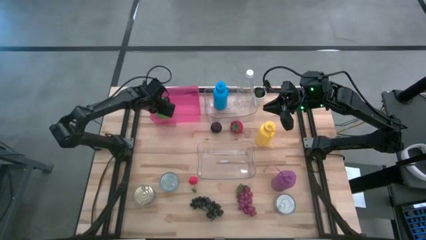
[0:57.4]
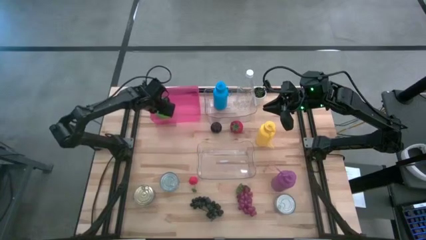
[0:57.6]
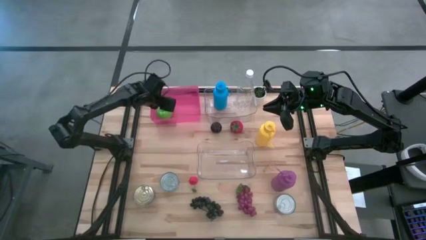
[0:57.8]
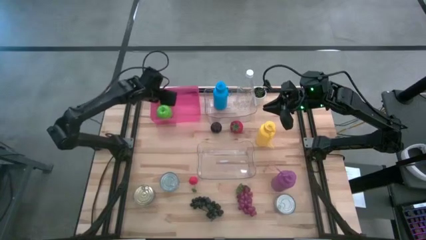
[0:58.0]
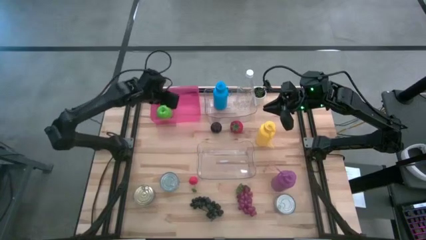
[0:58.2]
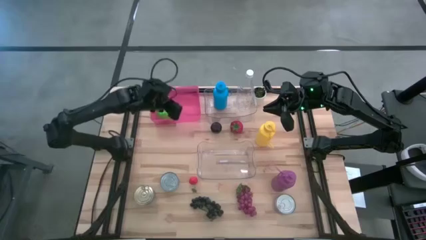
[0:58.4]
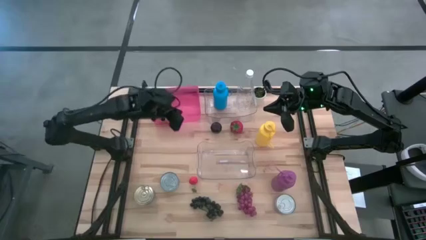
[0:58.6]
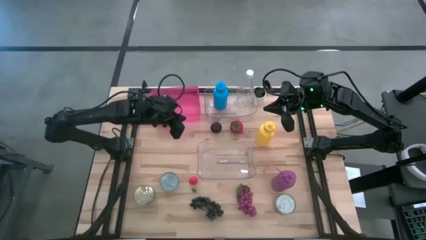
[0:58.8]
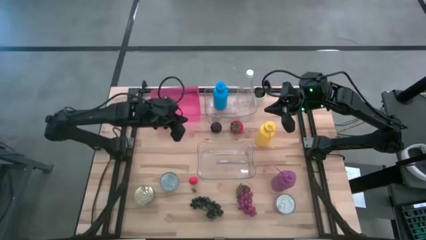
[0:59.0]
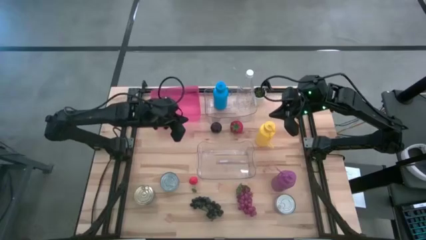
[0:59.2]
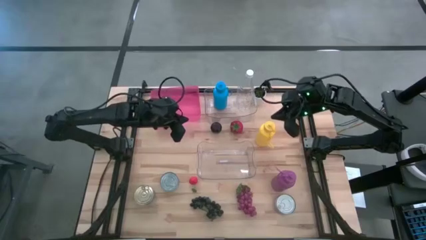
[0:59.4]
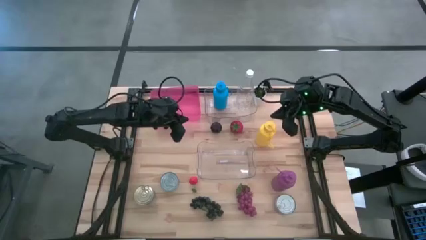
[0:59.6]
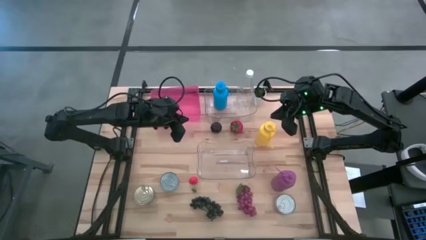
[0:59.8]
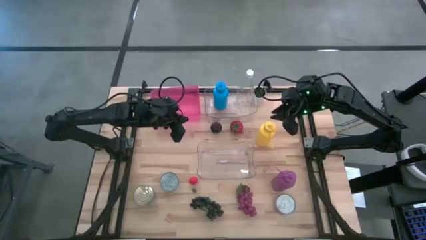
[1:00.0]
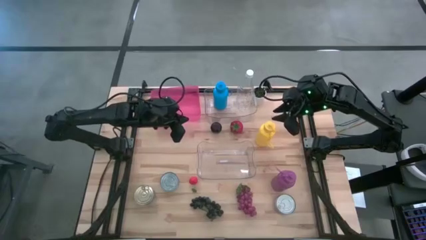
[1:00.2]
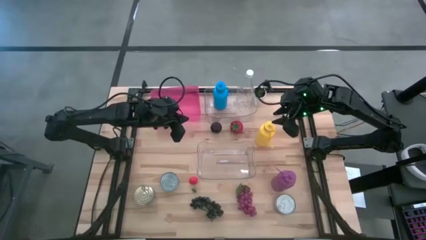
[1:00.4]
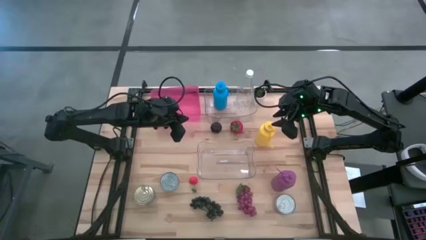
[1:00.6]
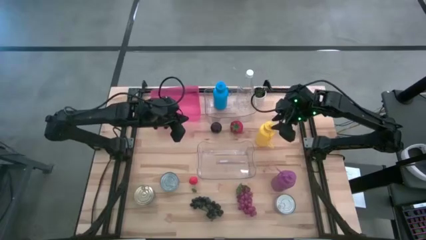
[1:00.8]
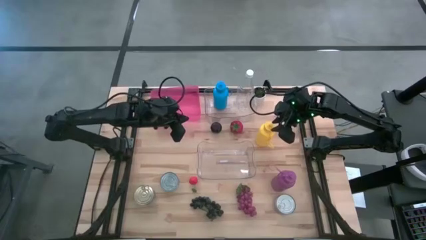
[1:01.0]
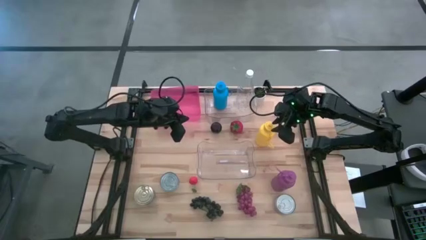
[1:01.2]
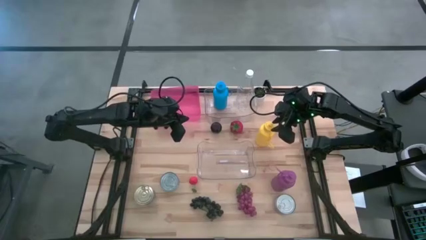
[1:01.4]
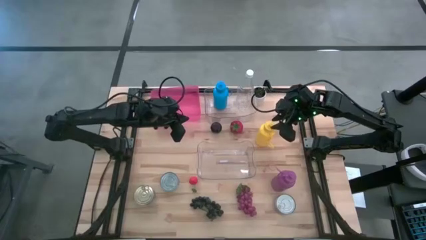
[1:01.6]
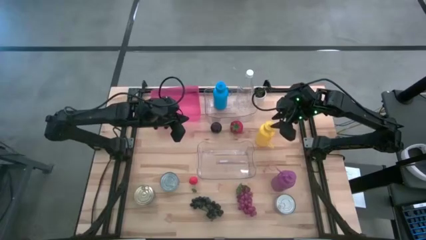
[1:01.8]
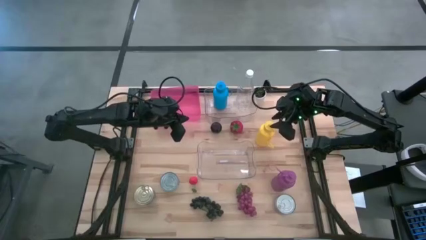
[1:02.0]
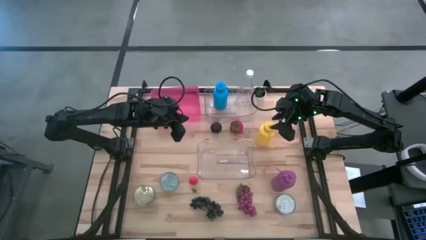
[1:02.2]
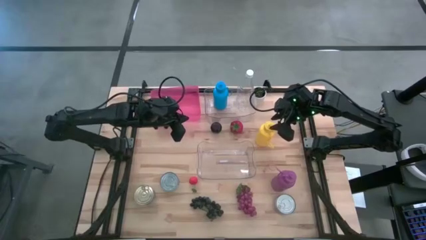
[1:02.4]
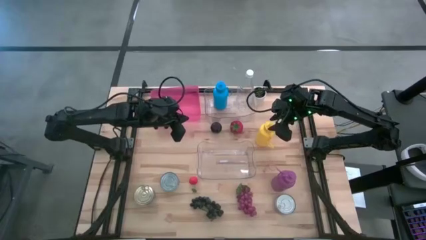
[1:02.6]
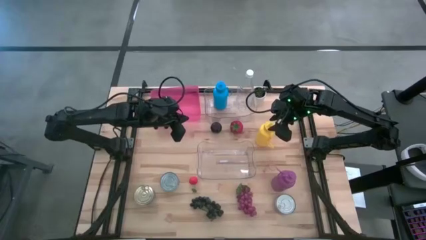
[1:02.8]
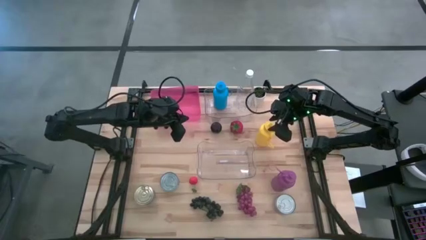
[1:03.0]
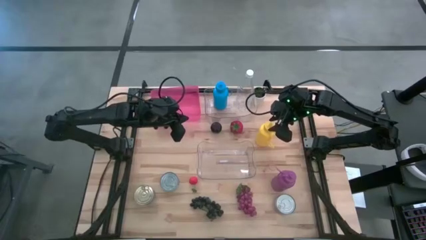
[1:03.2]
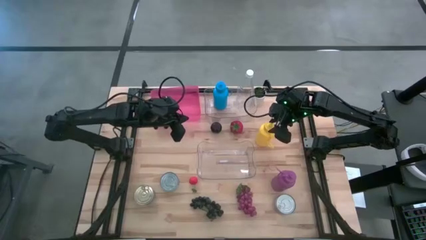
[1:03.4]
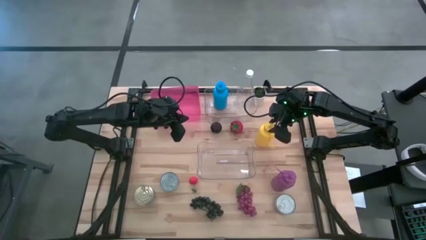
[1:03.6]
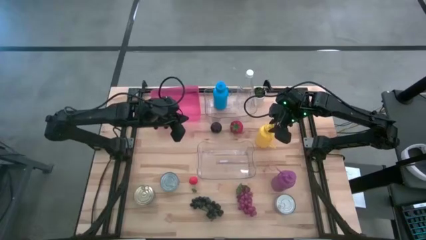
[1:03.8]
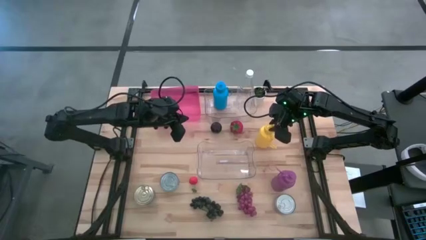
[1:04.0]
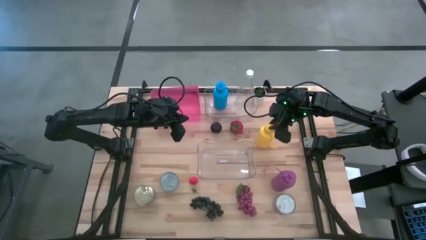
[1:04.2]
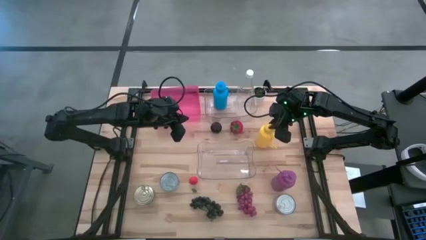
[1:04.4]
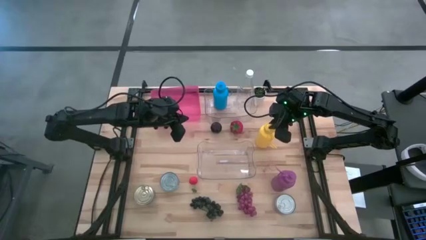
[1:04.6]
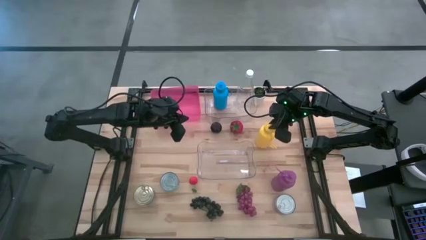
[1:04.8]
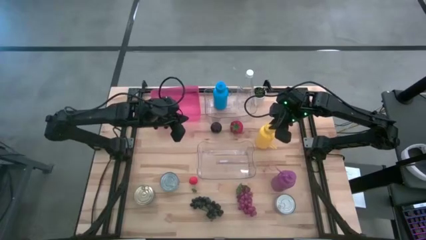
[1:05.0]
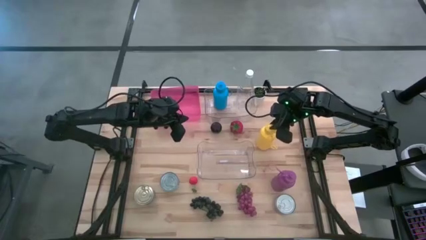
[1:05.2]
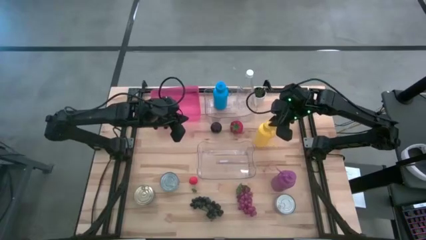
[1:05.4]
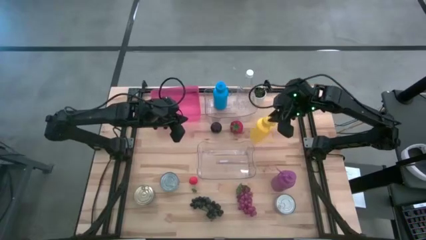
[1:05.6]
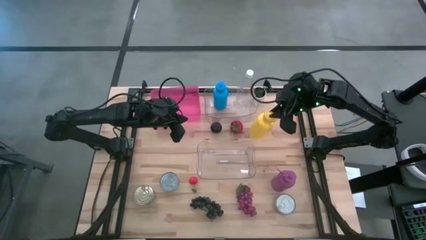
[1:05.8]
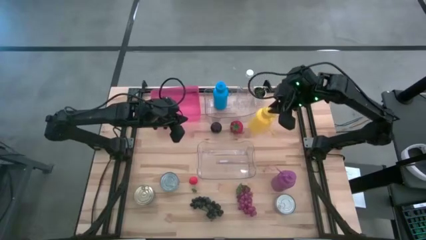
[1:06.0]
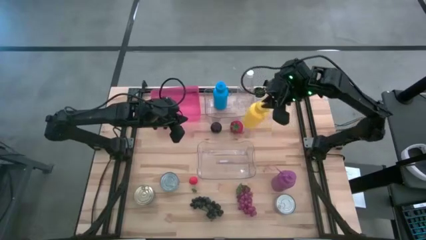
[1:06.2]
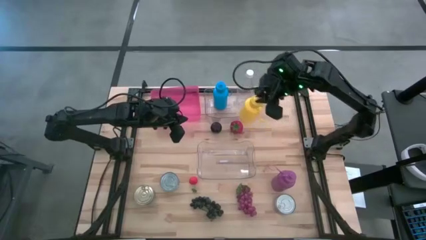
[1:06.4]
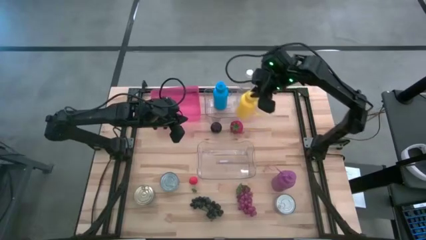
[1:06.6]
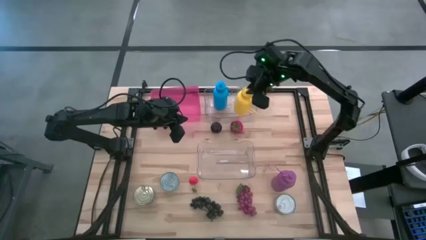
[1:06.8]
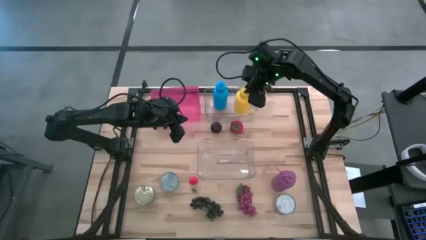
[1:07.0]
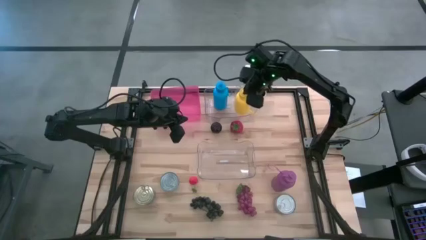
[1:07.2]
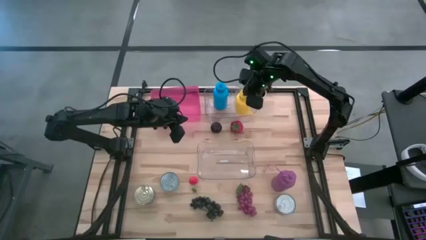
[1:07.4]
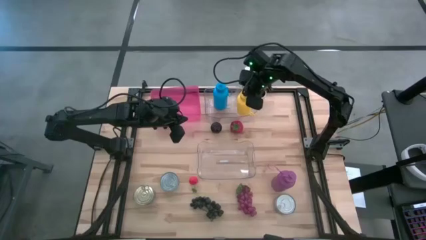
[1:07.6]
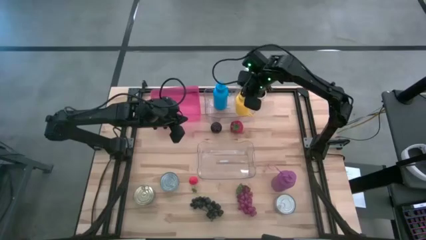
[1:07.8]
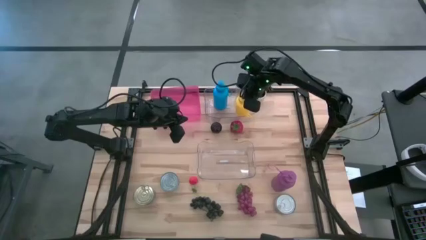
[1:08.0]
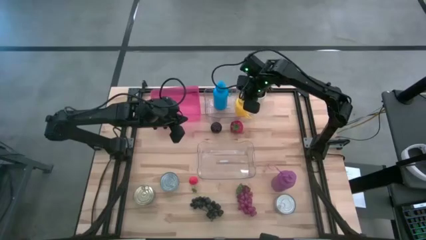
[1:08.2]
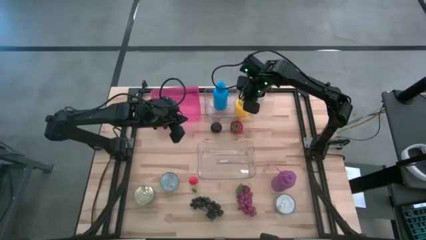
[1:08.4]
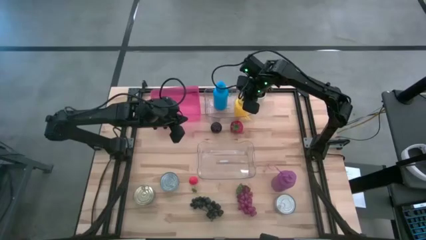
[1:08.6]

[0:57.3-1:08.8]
Task: Pick & Place Food Item
Put the yellow bottle into the top transparent bin
